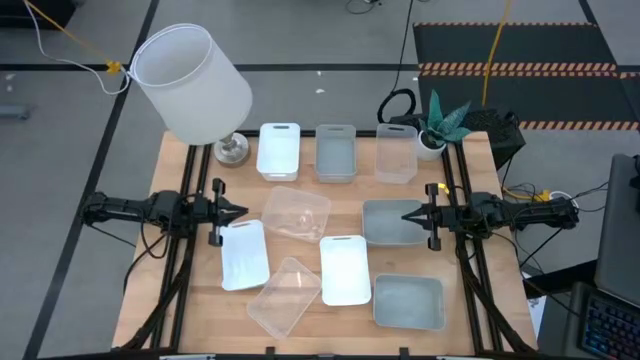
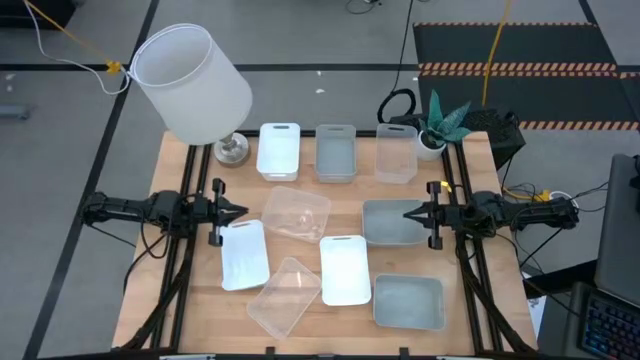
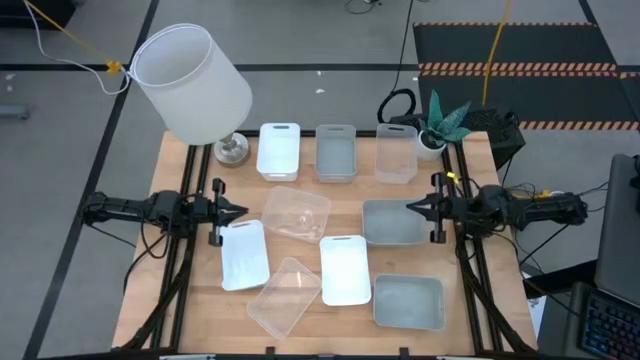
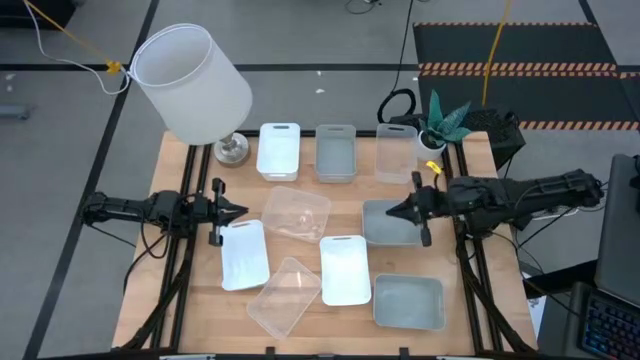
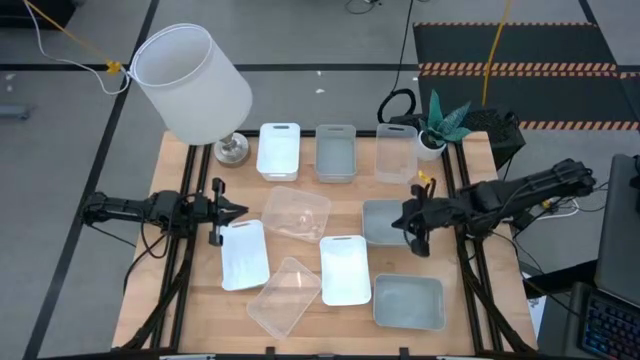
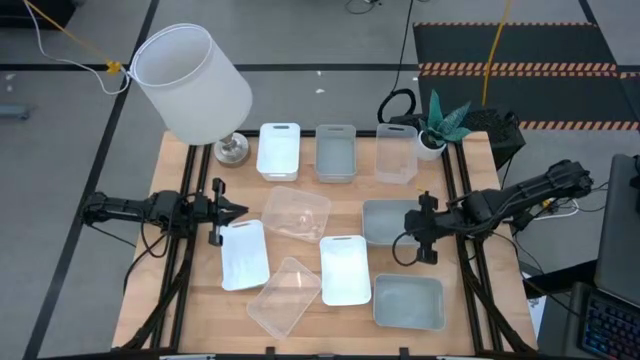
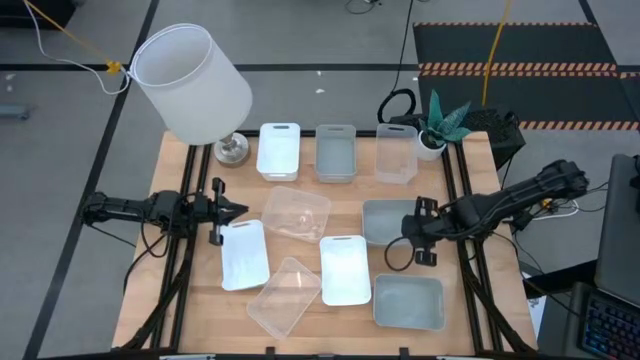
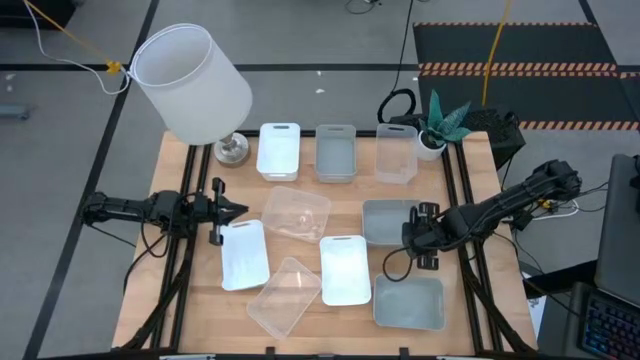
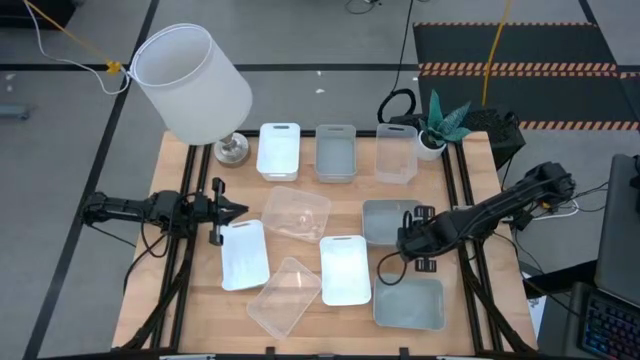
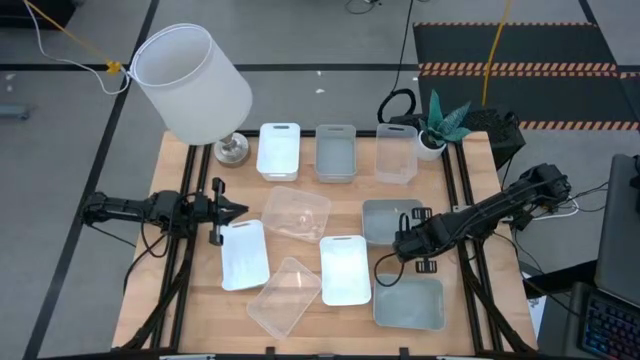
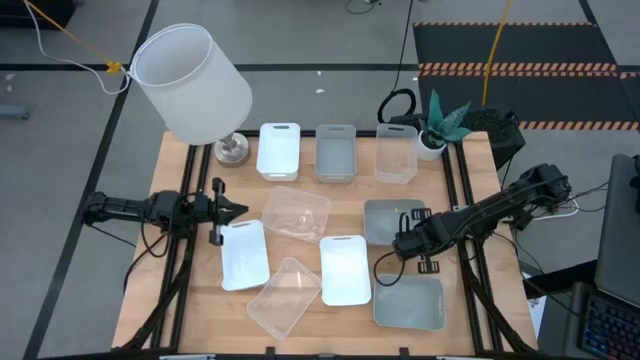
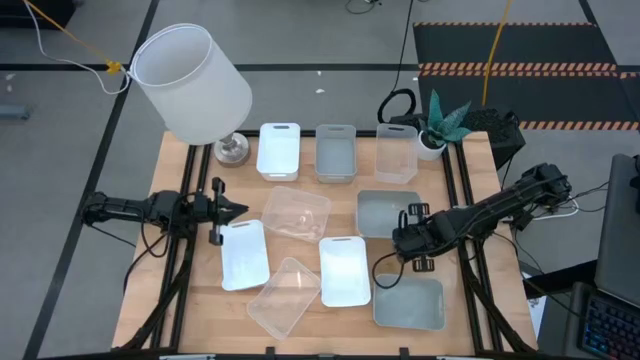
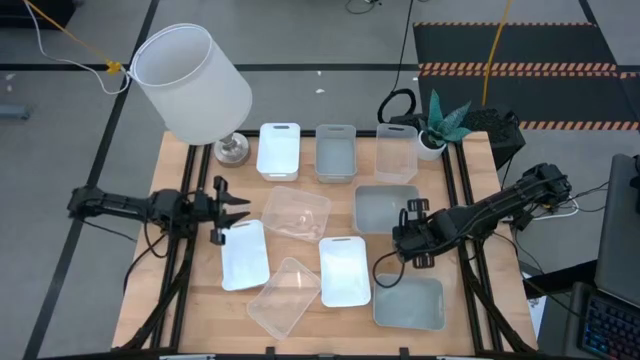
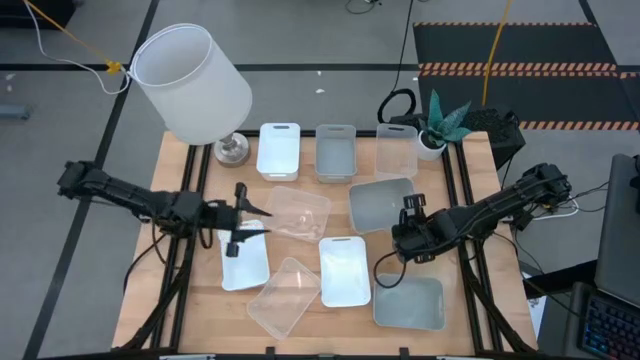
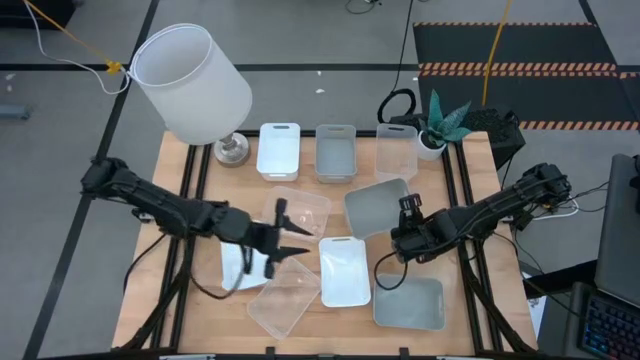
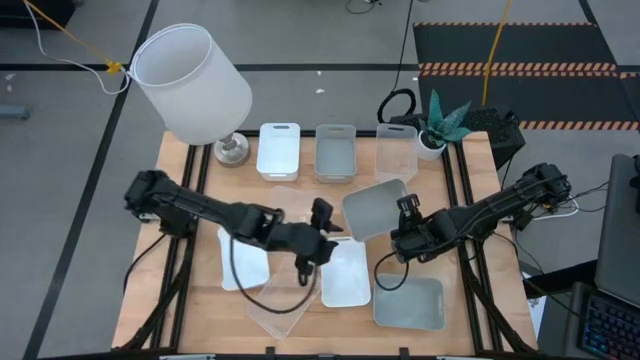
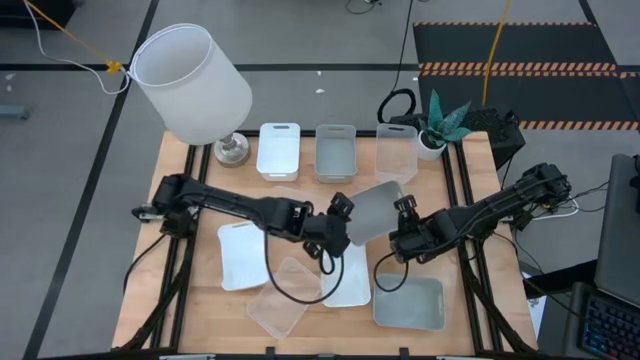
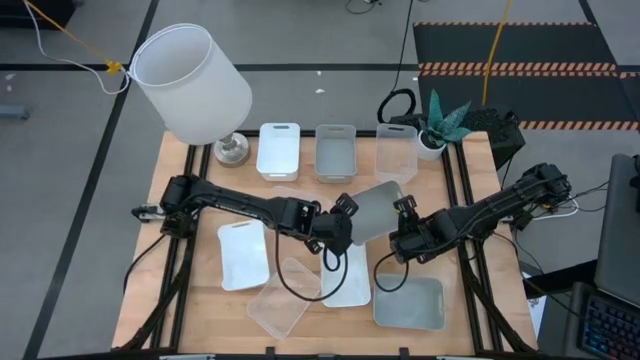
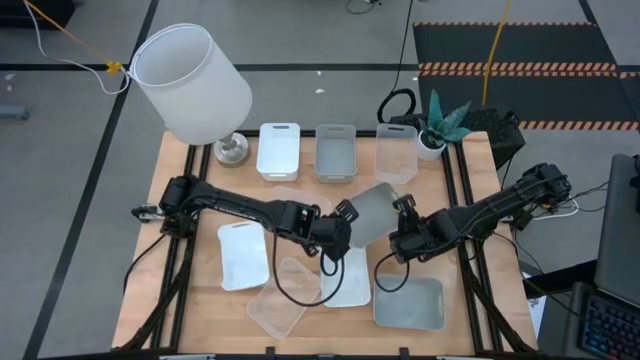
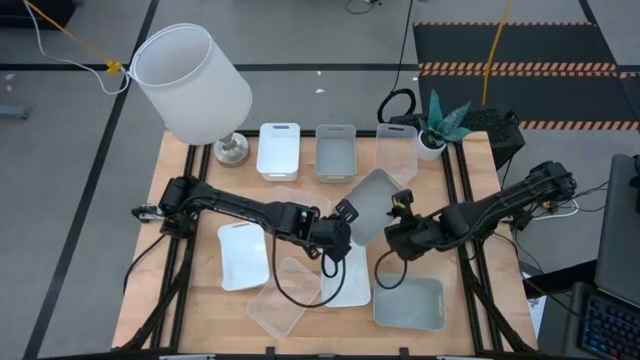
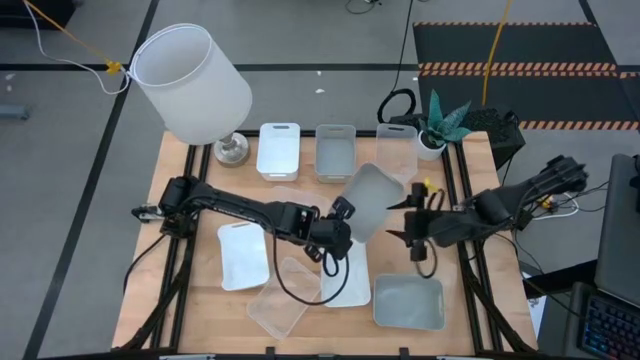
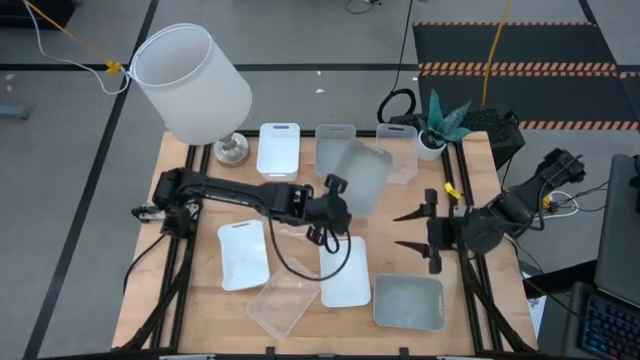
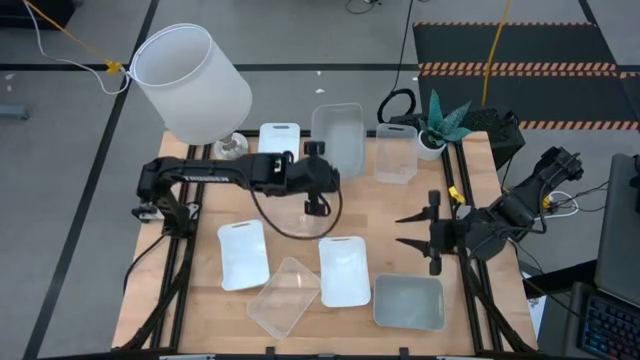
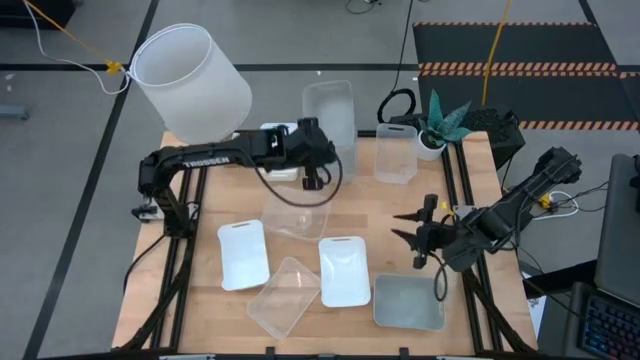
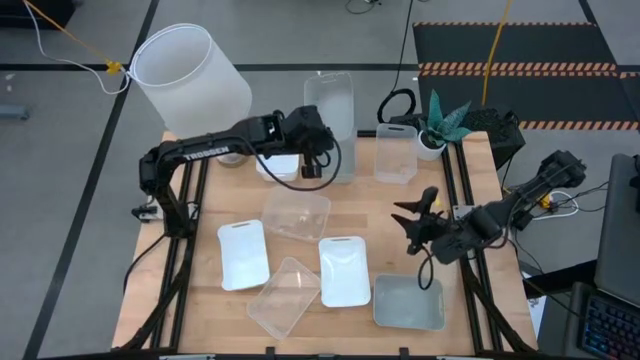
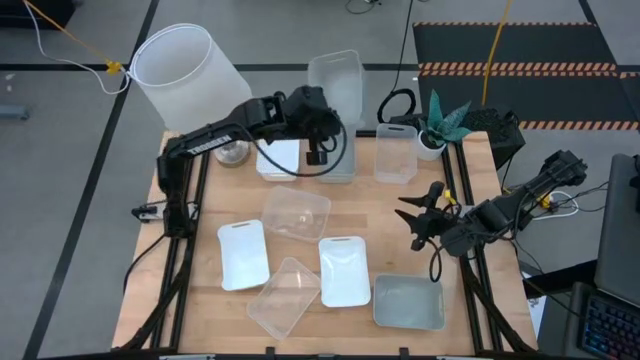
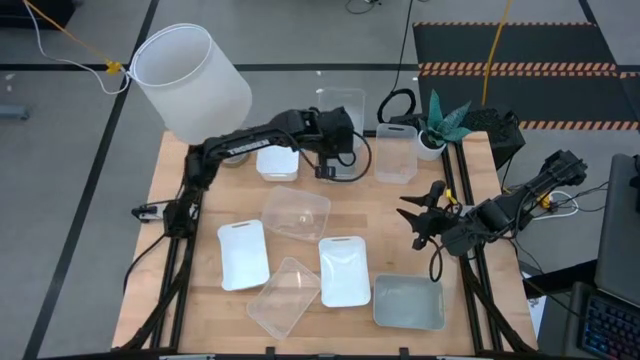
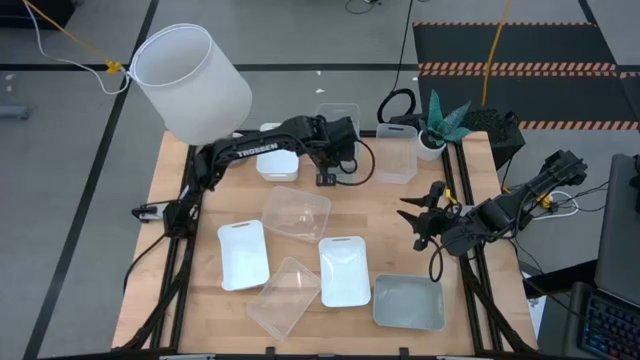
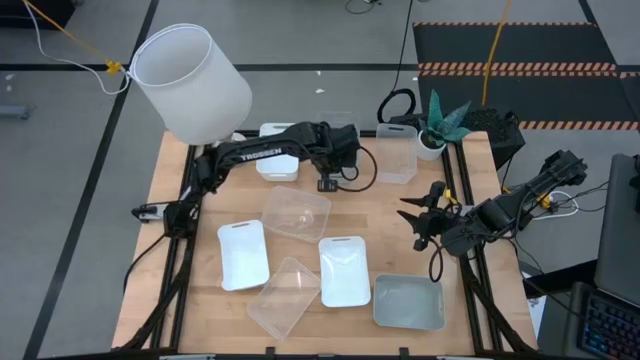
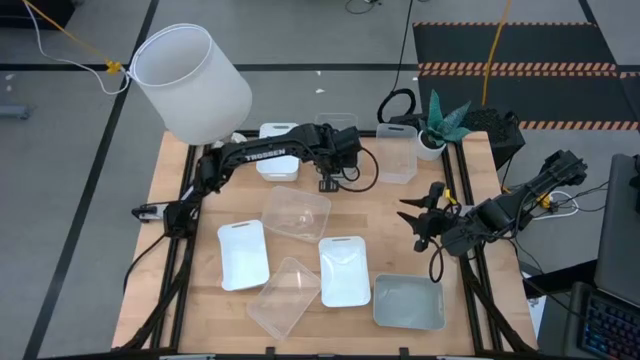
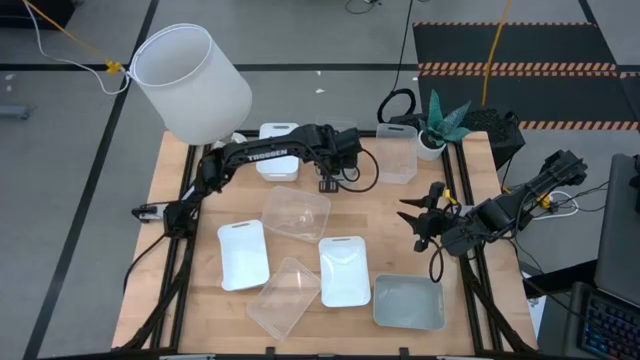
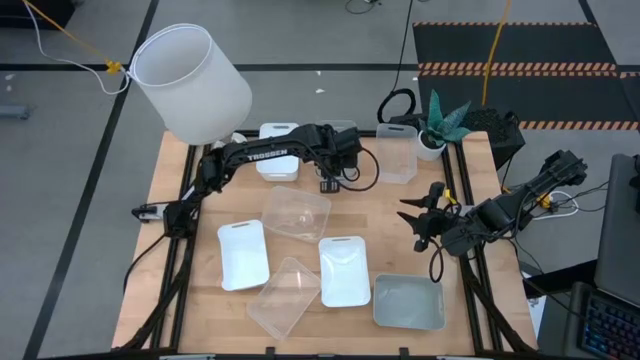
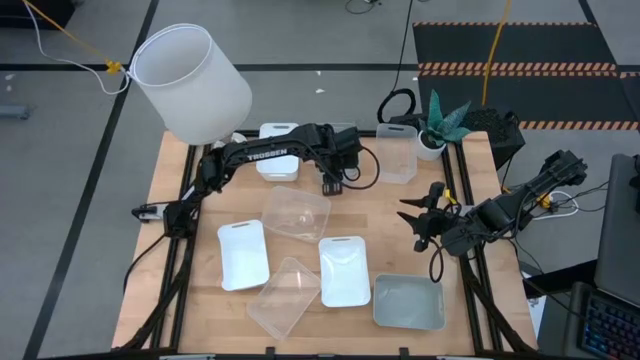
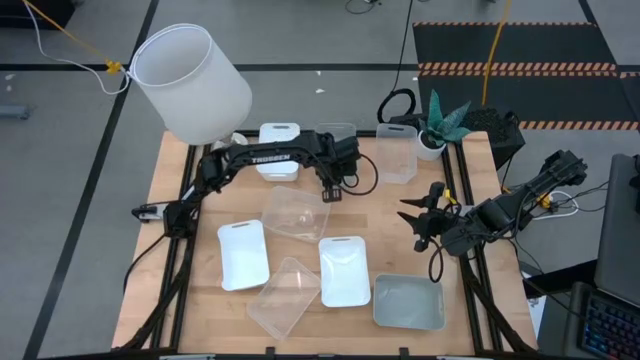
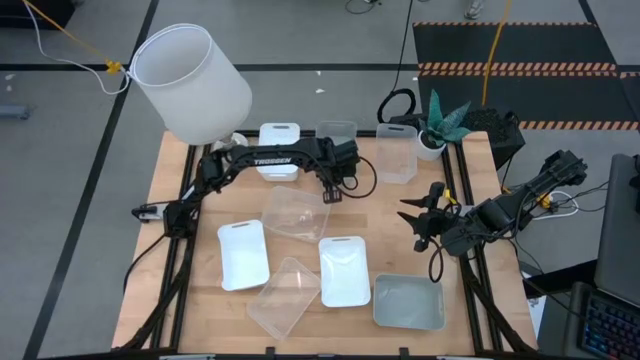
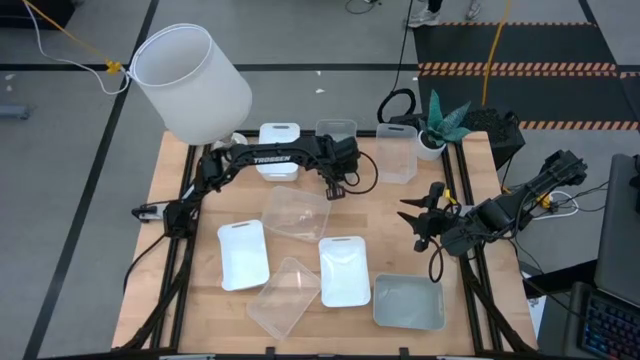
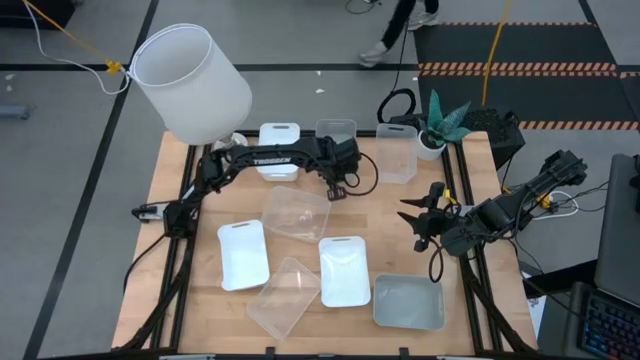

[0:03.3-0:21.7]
Stack the middle gray bin on the top middle gray bin
